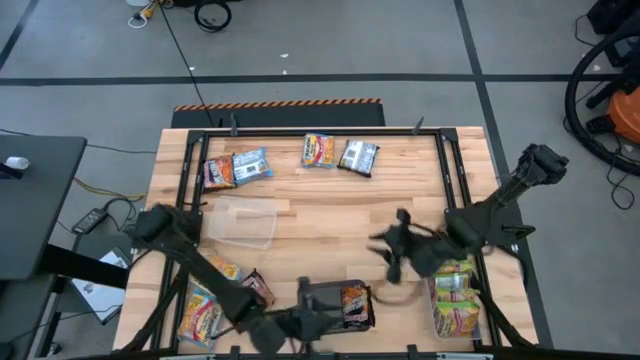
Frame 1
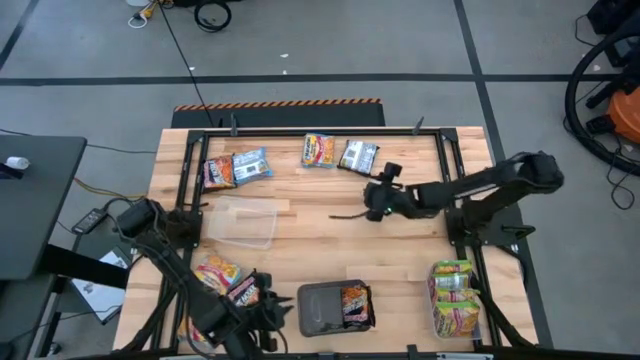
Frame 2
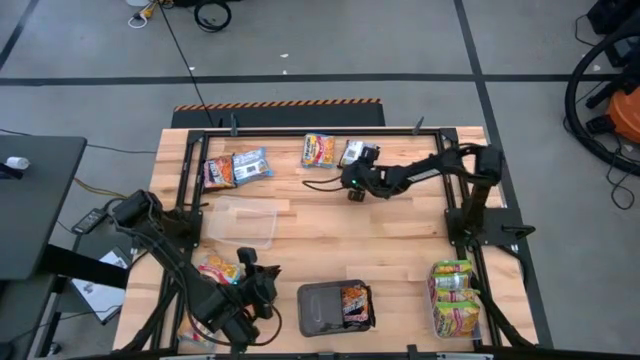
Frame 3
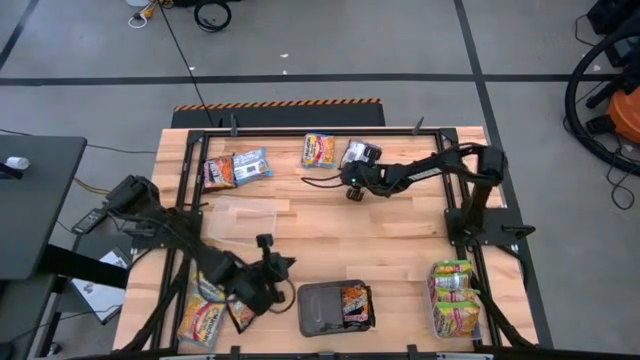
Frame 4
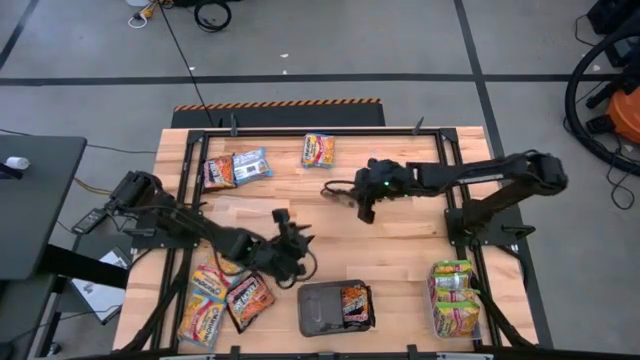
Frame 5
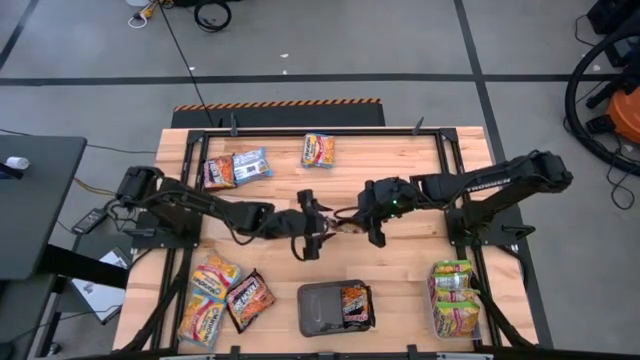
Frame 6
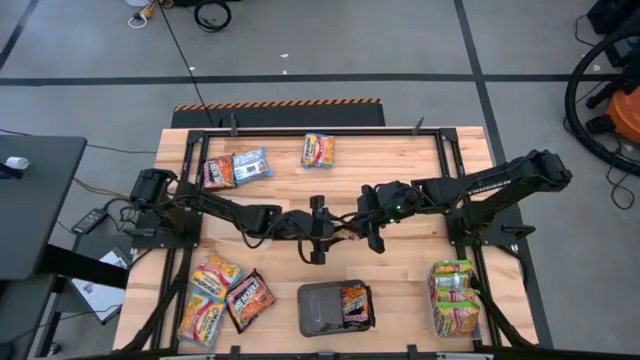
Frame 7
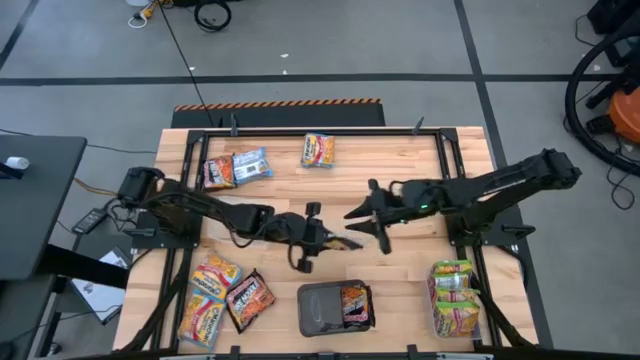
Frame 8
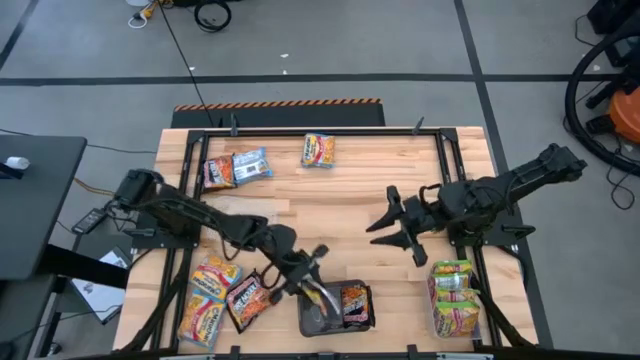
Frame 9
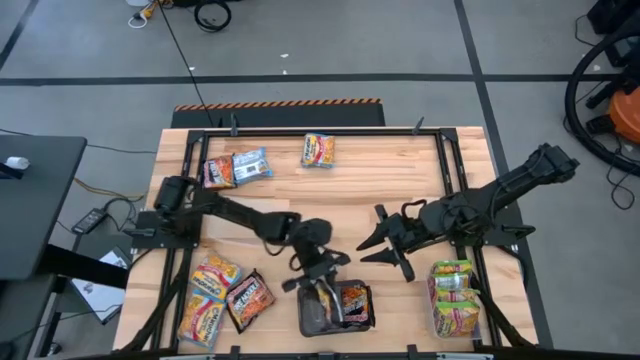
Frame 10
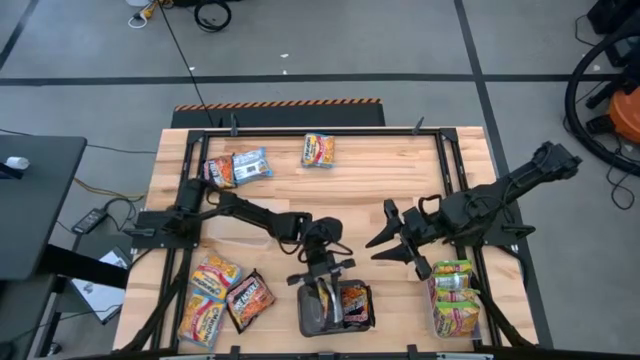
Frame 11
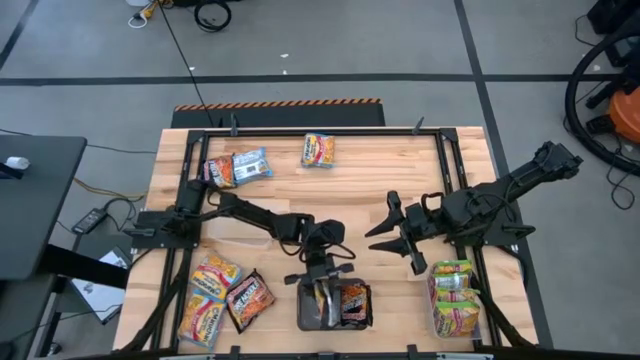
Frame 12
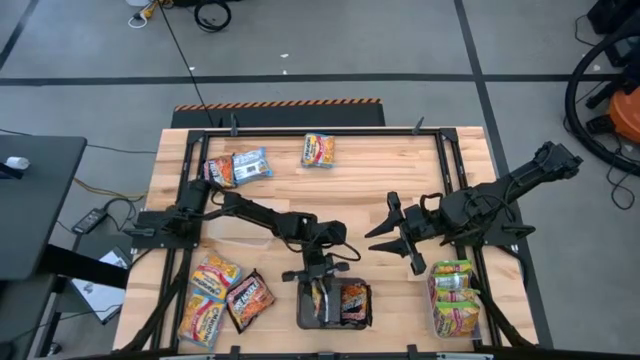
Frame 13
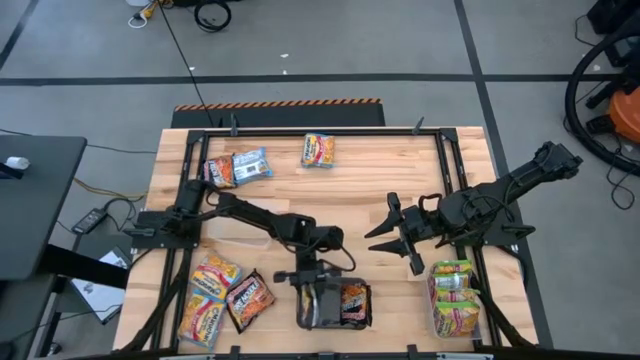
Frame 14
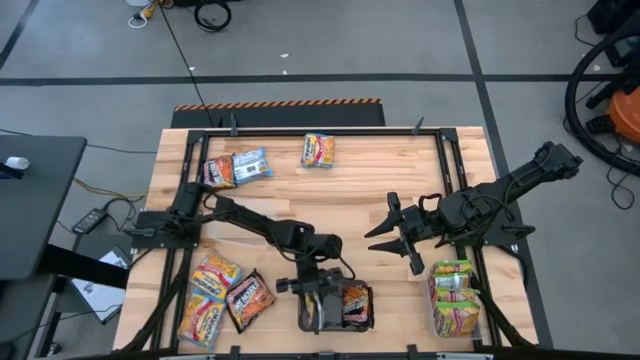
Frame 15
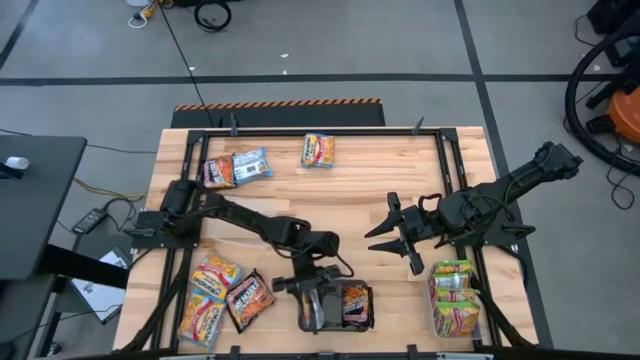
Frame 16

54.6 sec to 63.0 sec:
Task: Sort Maruchan noodles
Put the top right black noodle pack into the black bin

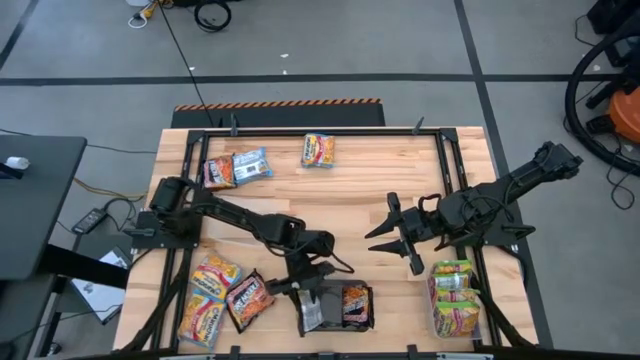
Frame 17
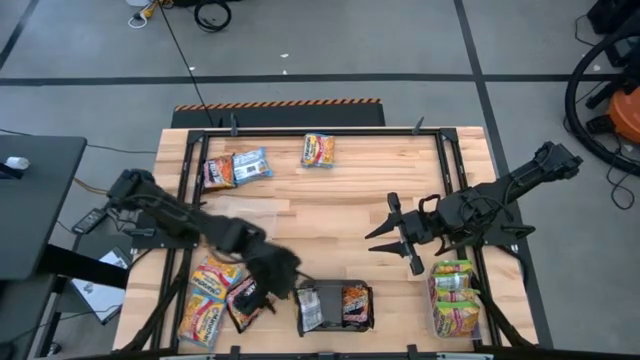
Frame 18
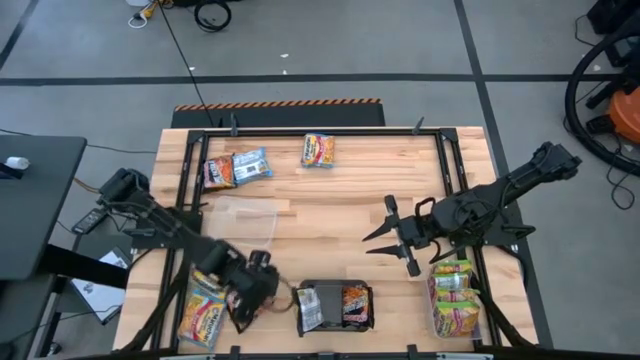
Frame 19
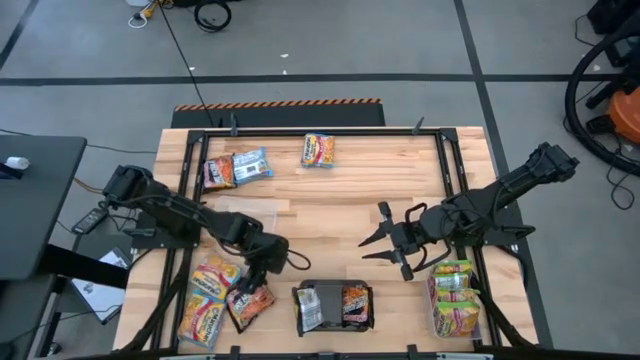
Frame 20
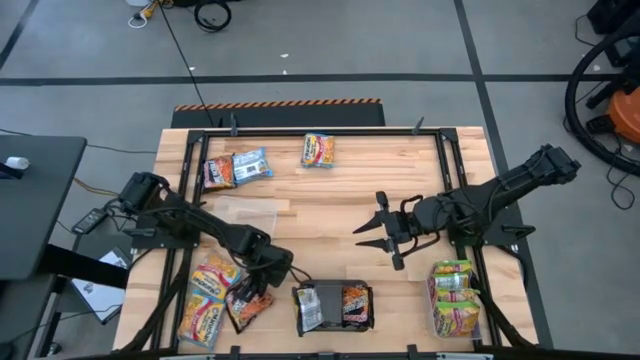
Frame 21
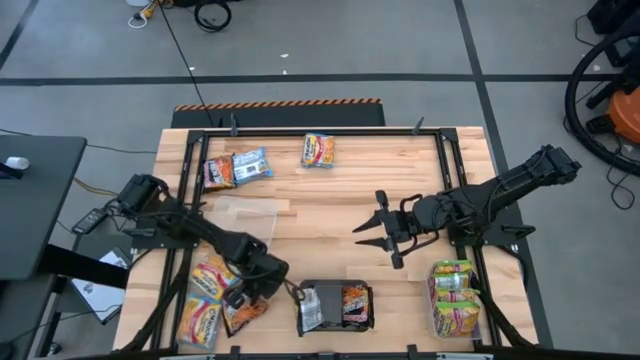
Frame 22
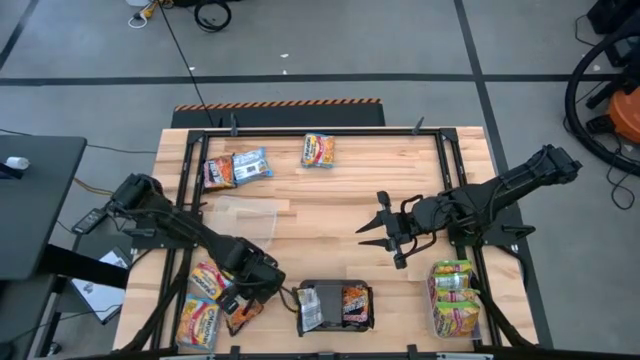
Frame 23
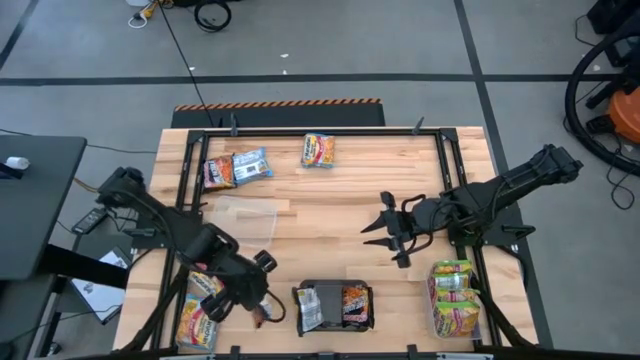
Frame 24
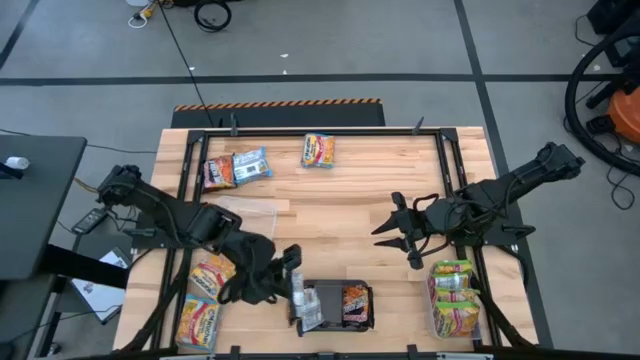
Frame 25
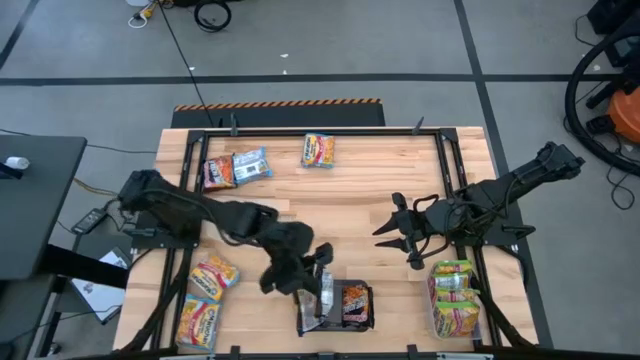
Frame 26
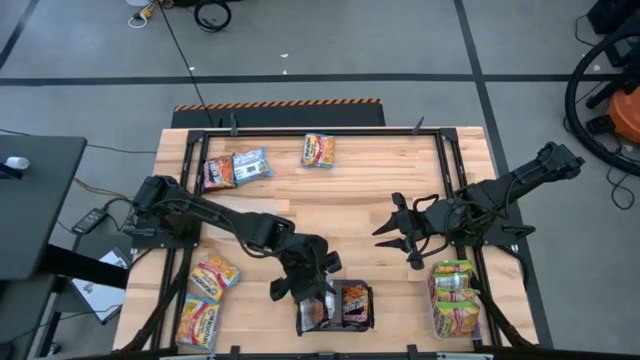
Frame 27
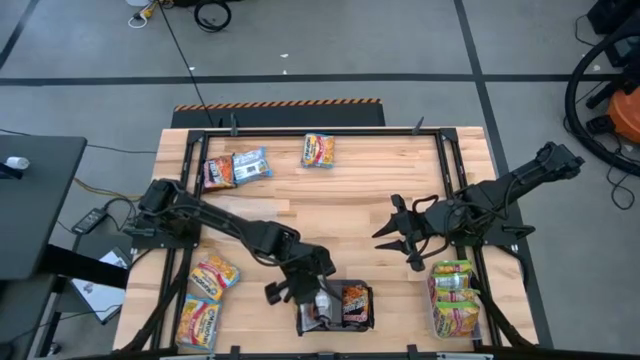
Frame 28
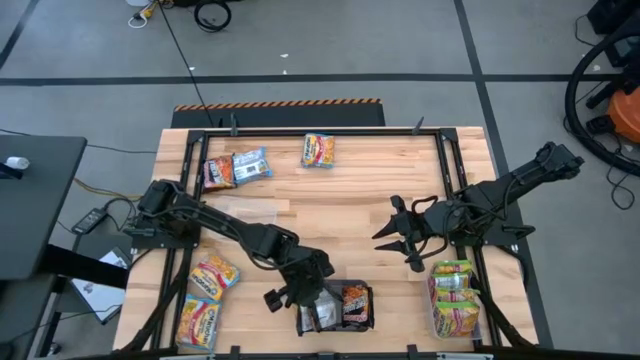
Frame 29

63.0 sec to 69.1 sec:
Put the bottom black noodle pack into the black bin

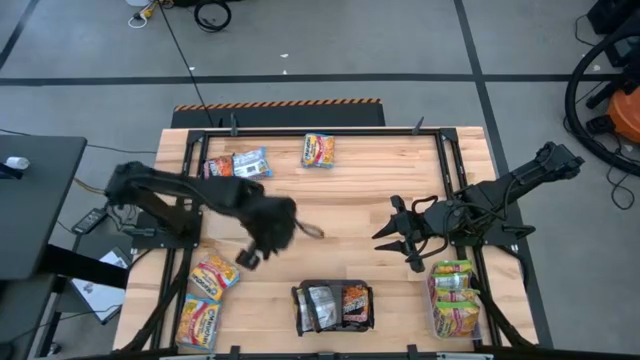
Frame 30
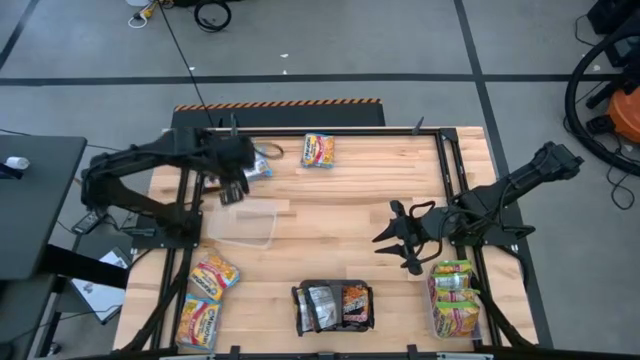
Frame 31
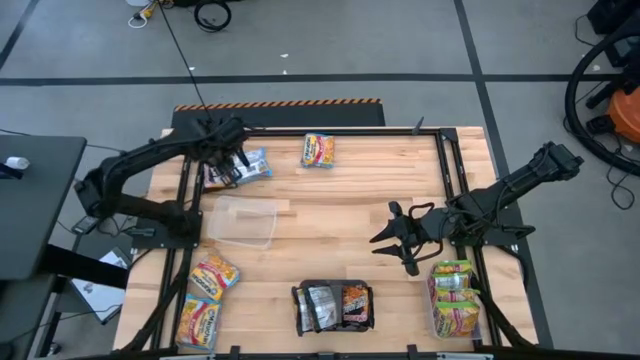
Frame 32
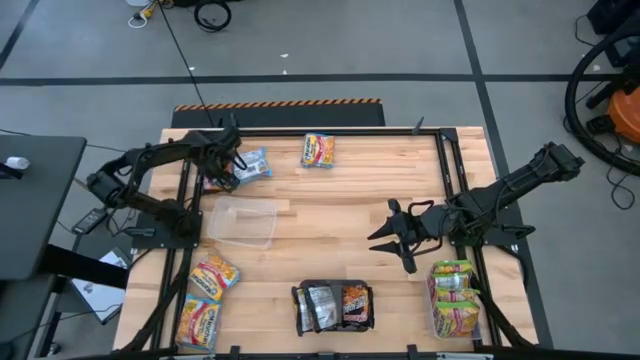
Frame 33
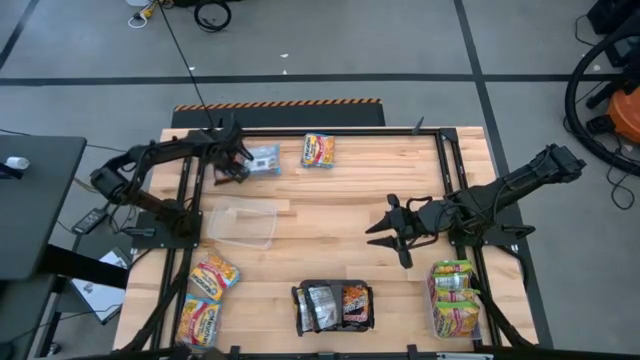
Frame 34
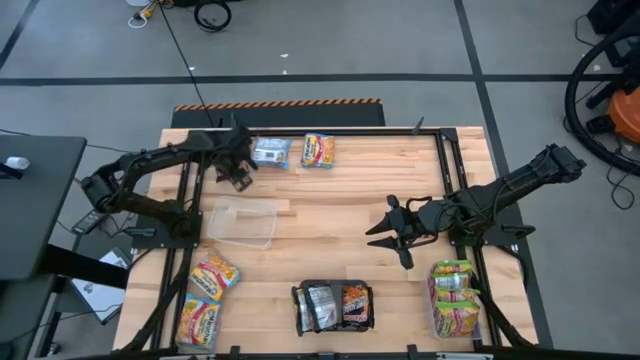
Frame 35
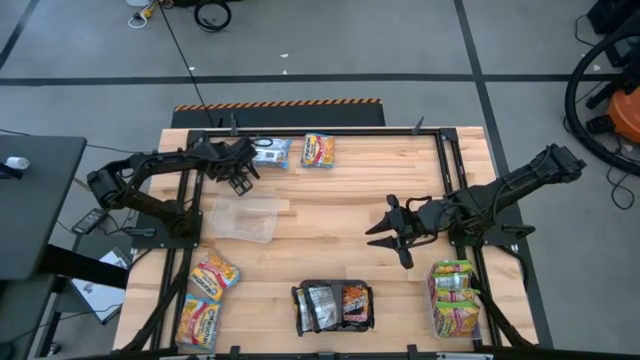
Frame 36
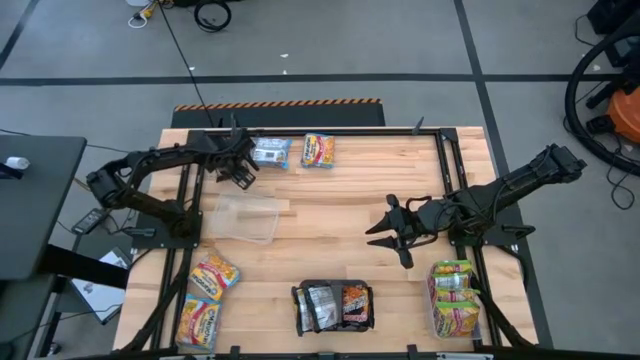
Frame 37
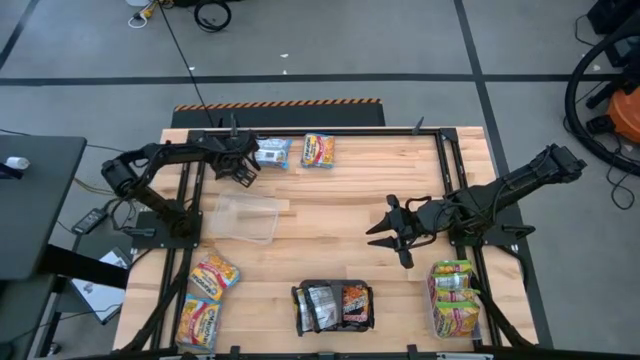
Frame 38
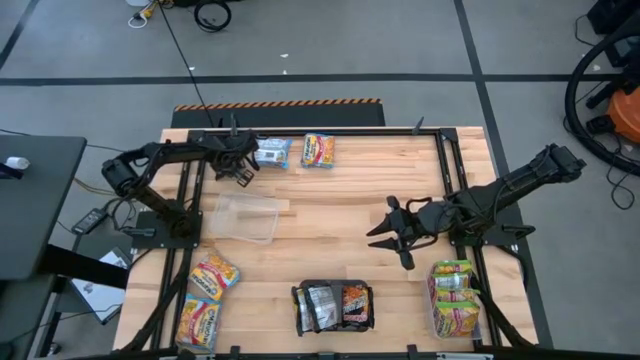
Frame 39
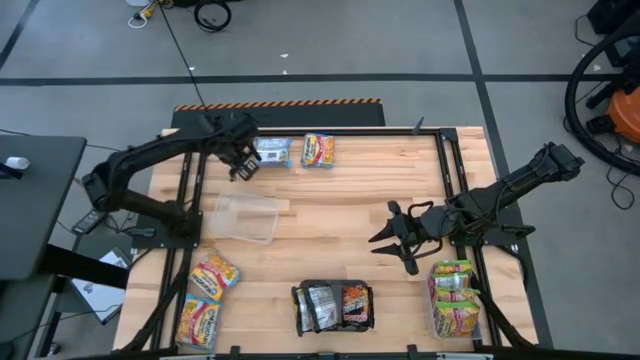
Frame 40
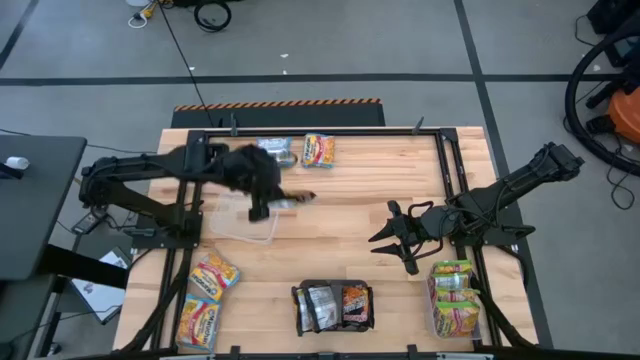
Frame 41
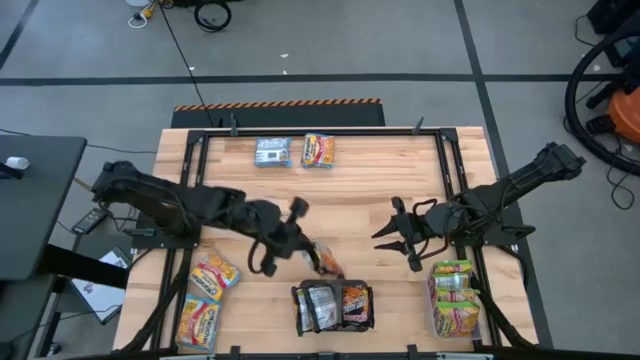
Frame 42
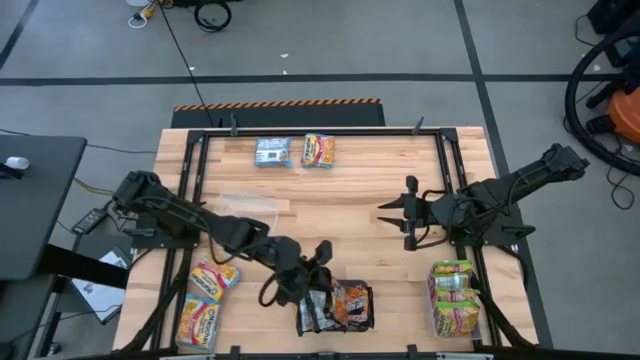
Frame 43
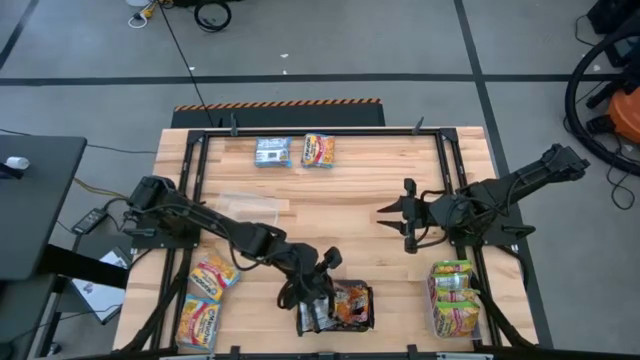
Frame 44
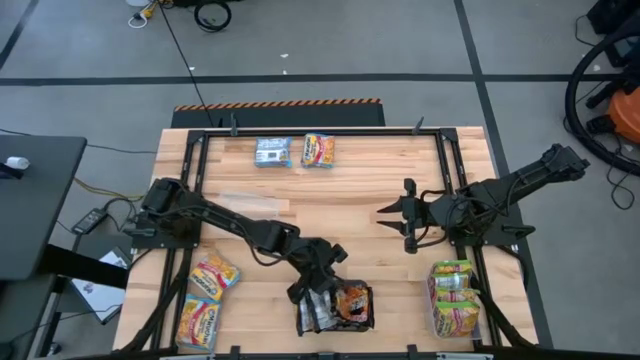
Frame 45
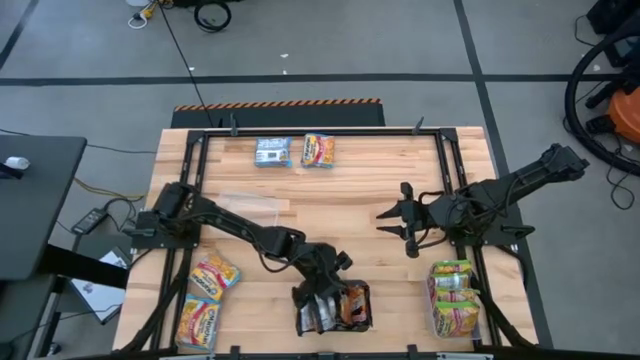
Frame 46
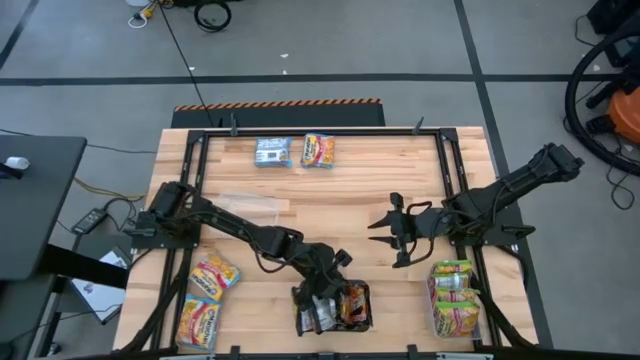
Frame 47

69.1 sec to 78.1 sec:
Put the black noodle pack into the black bin
